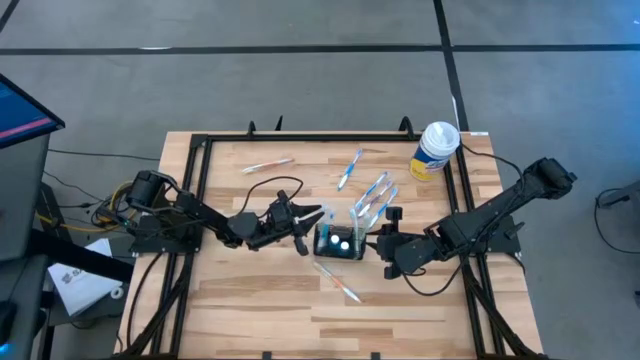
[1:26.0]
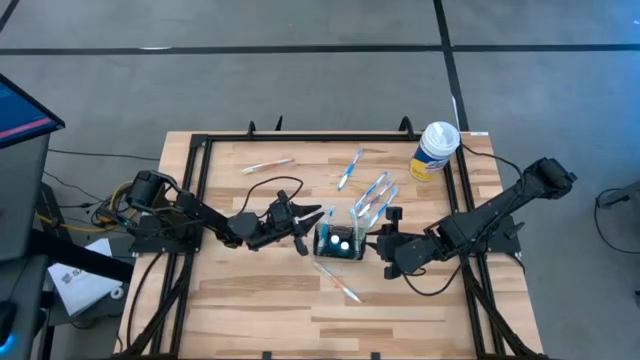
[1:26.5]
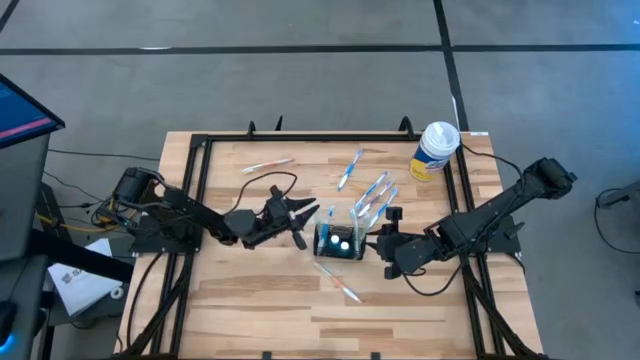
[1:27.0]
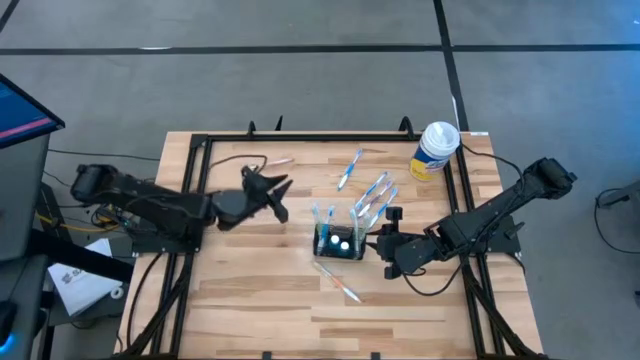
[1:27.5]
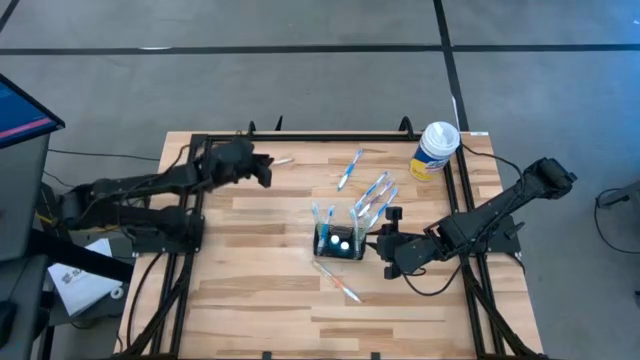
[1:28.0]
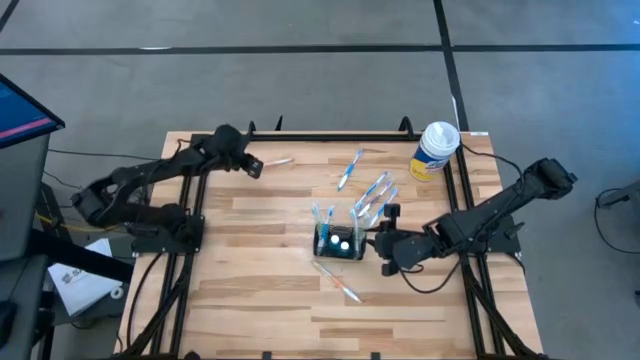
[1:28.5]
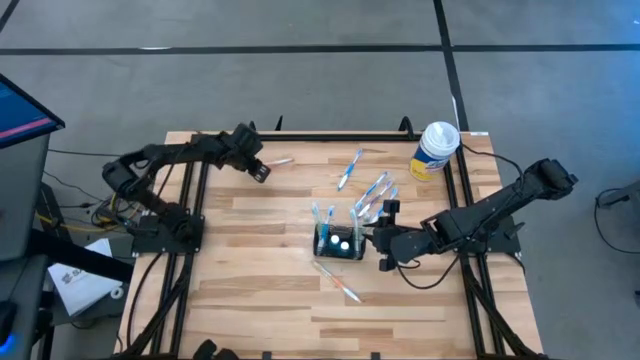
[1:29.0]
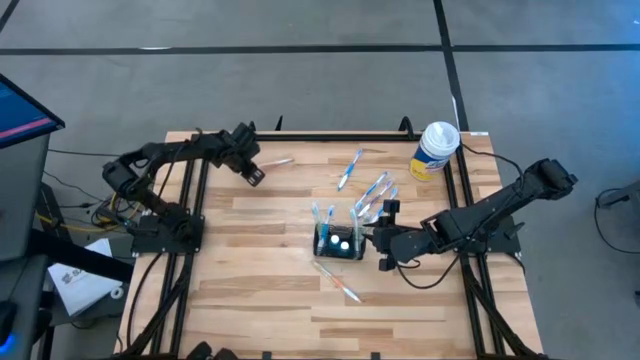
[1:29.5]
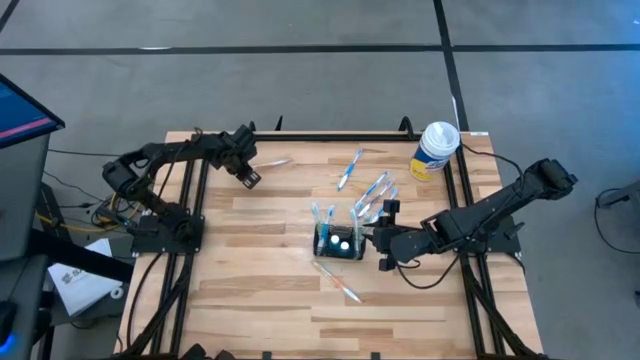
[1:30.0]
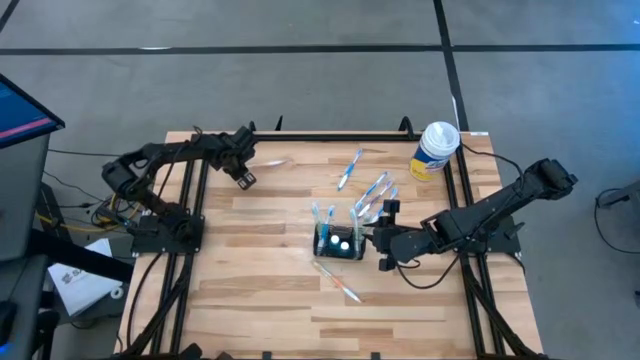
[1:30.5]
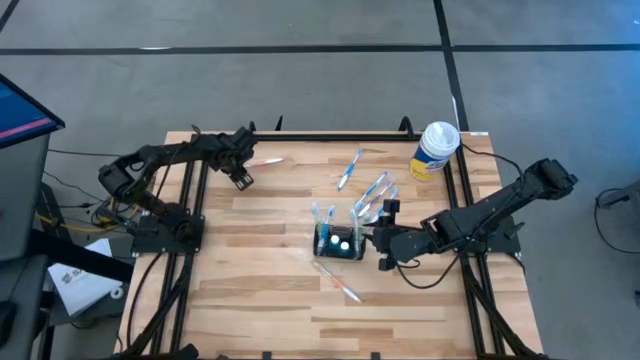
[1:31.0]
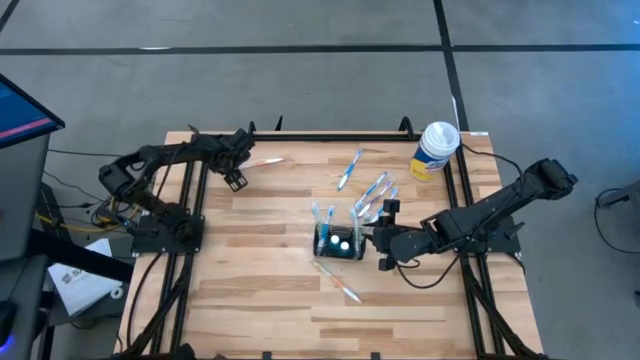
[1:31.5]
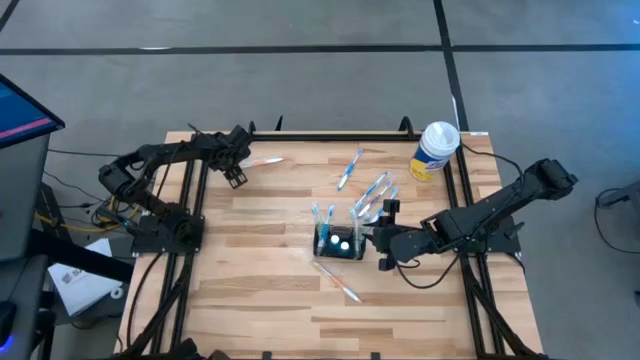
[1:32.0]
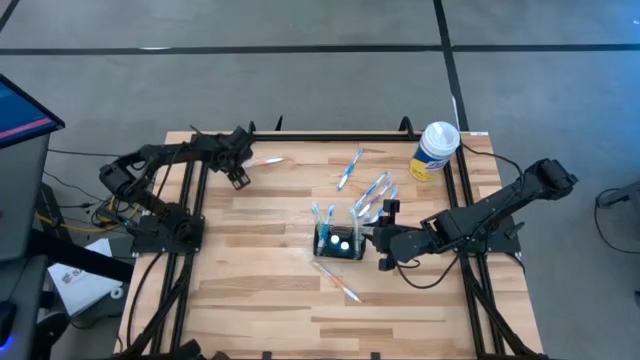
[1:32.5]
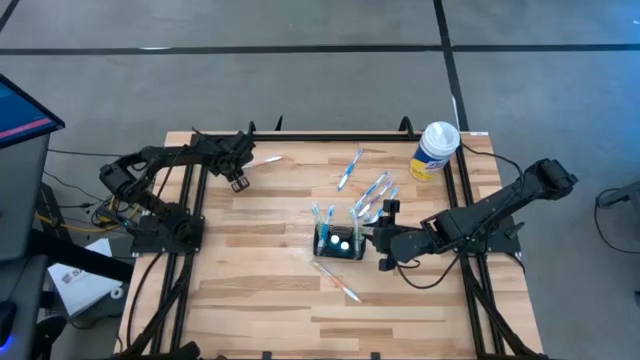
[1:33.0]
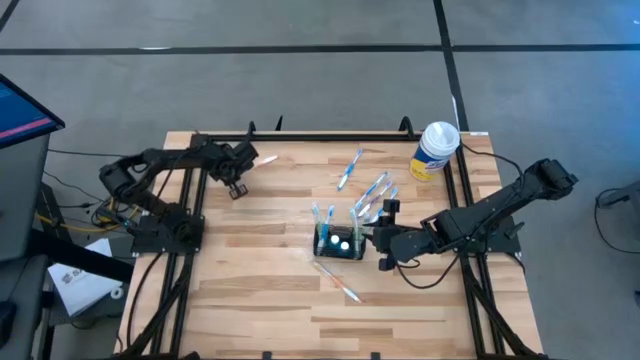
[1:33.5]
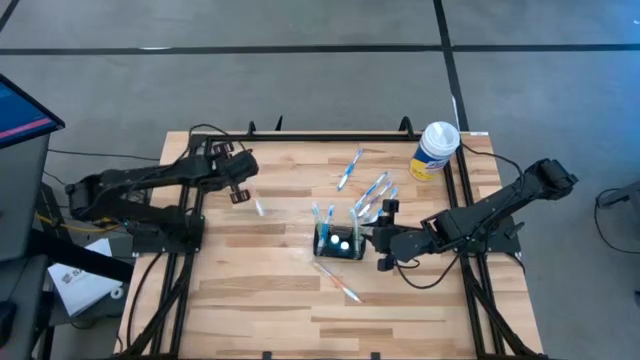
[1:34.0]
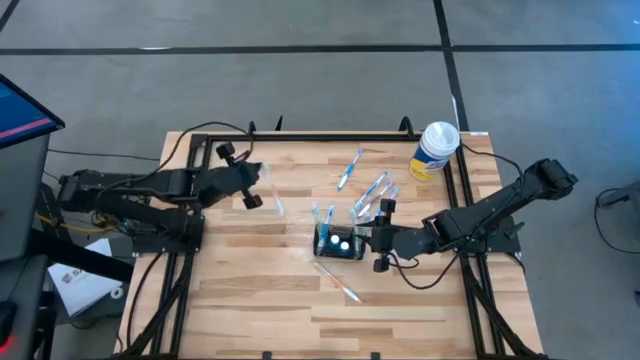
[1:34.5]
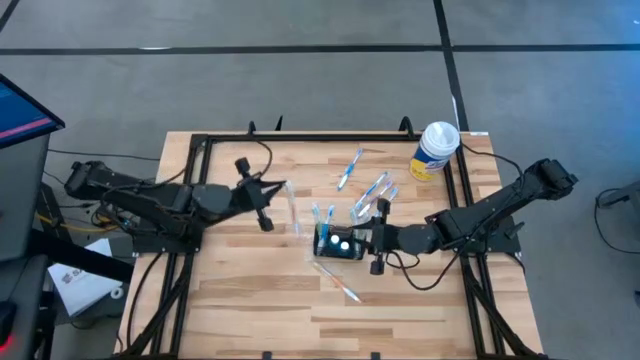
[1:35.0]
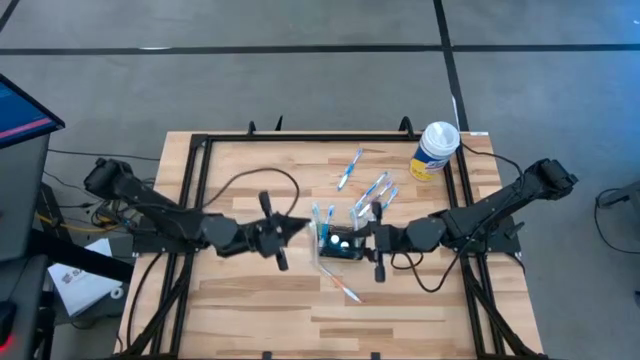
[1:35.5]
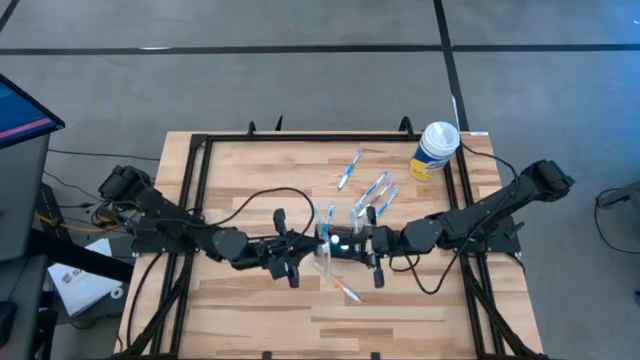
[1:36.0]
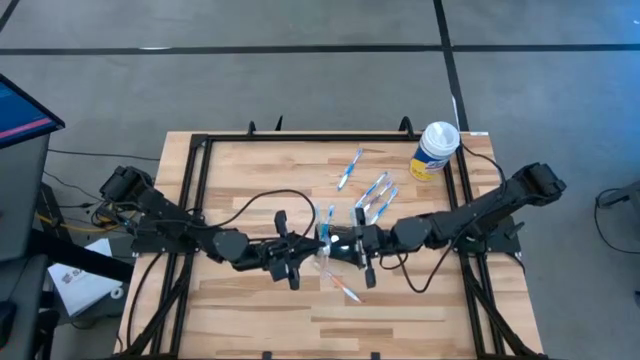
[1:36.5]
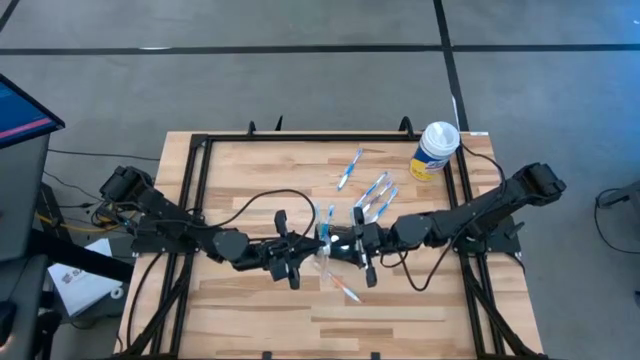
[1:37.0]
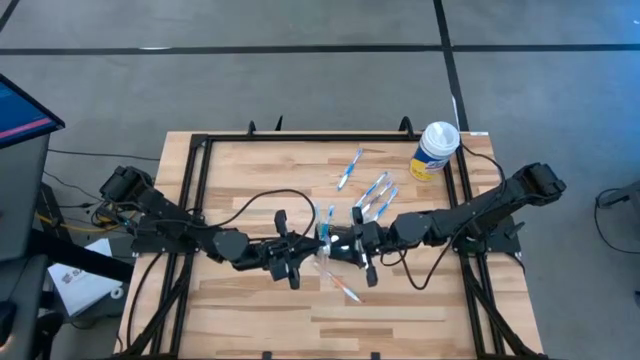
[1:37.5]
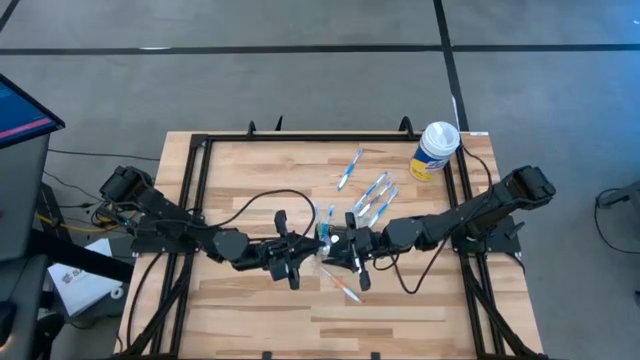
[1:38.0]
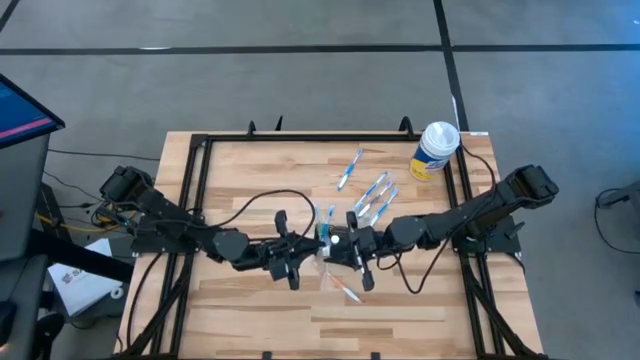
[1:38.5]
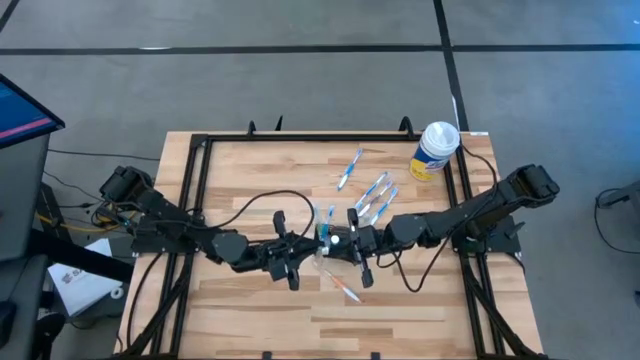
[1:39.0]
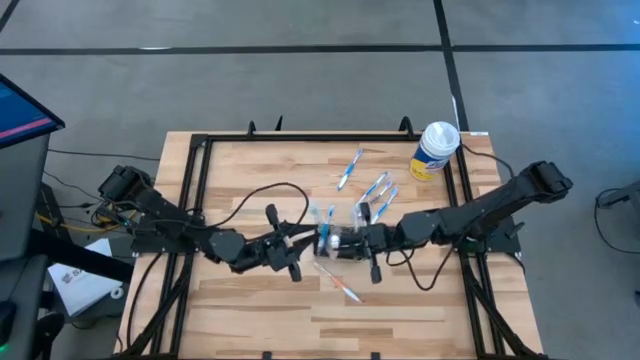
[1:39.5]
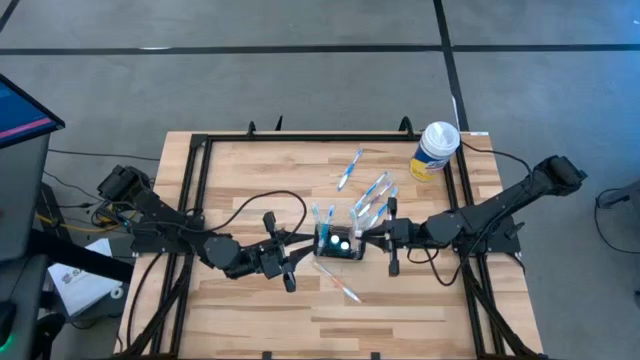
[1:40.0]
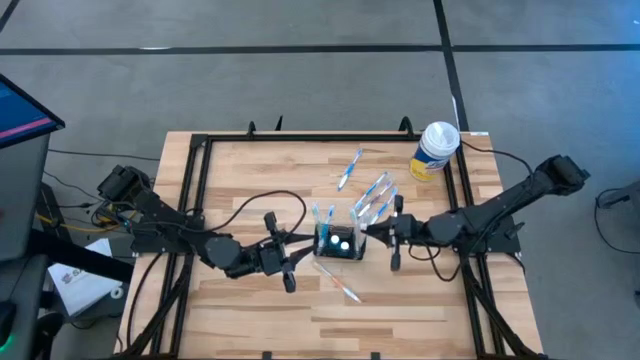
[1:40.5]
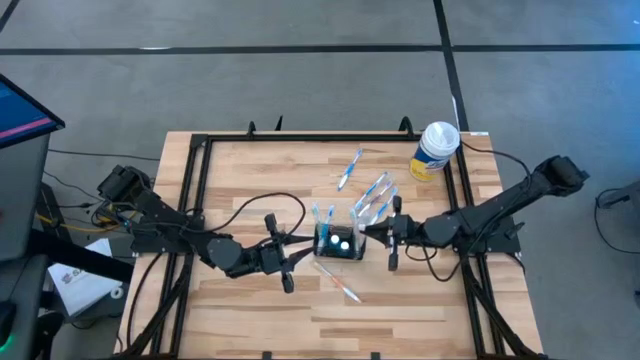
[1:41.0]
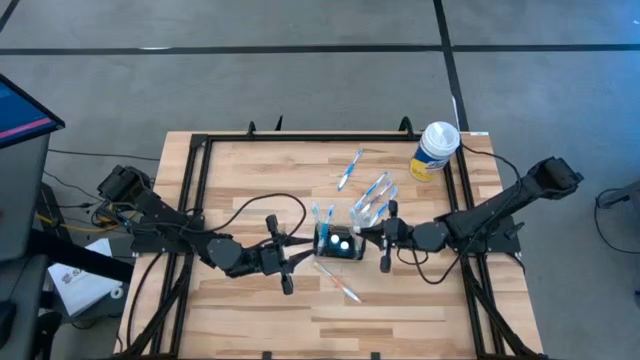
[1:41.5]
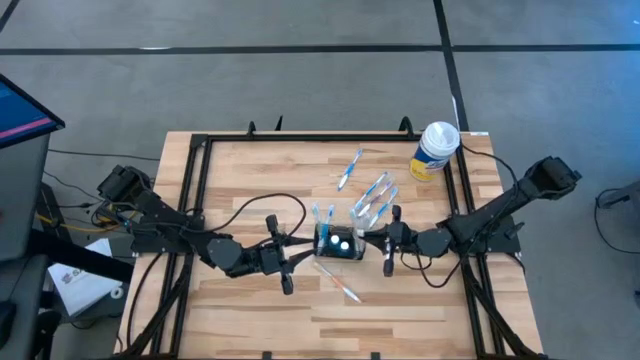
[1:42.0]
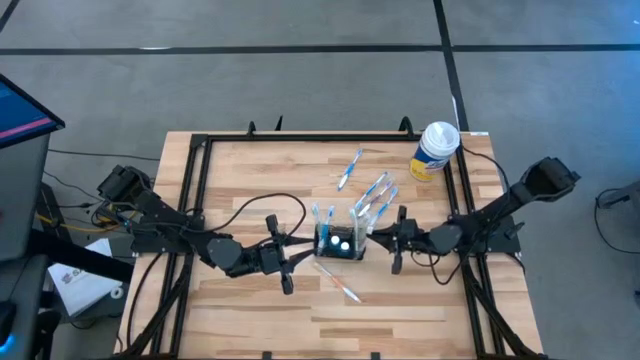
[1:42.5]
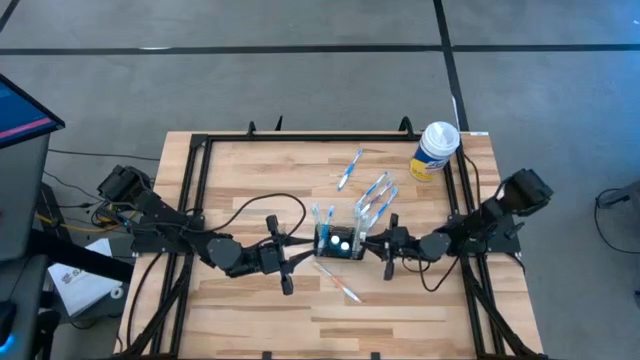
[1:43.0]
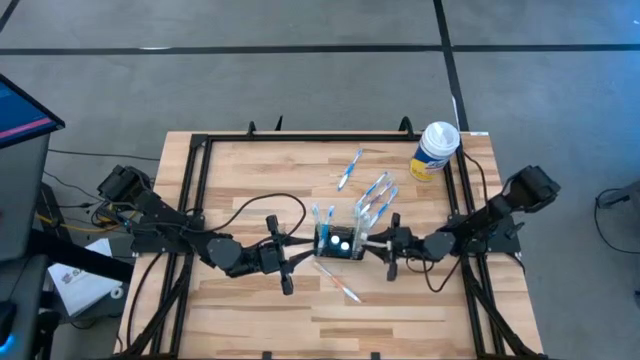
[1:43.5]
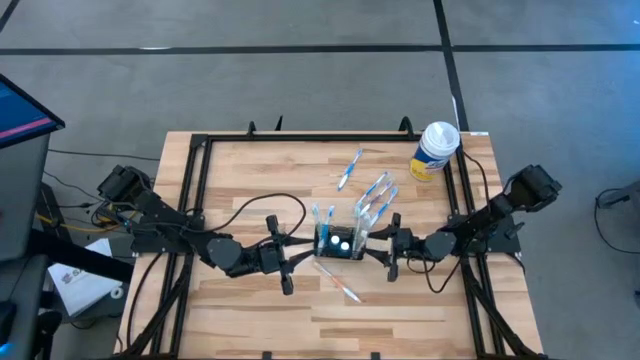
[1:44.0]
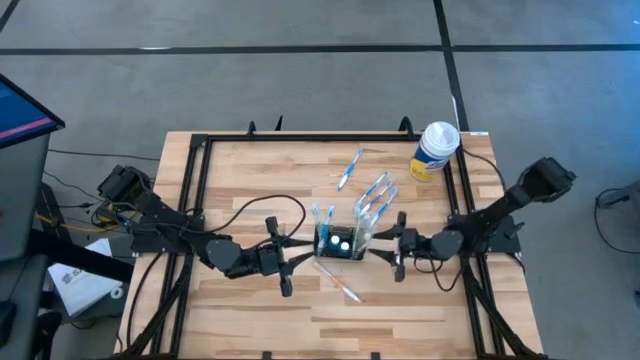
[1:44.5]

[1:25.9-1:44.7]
Task: Pick & Place toothbrushing station
Put the orange toothbrush into the wire organizer
